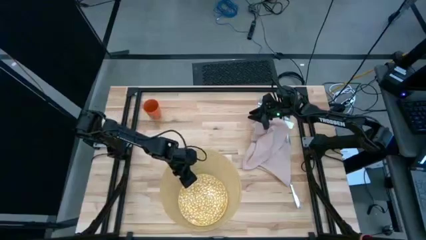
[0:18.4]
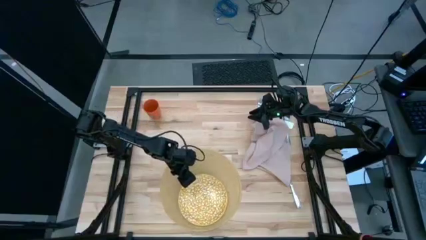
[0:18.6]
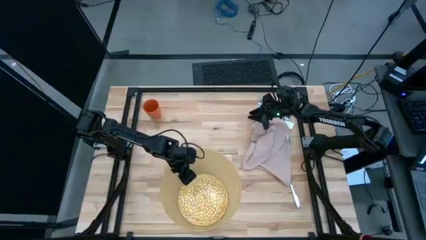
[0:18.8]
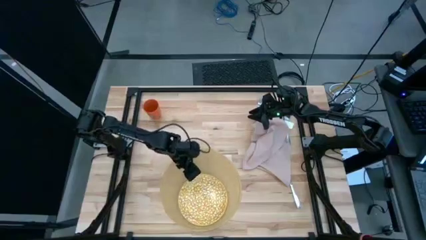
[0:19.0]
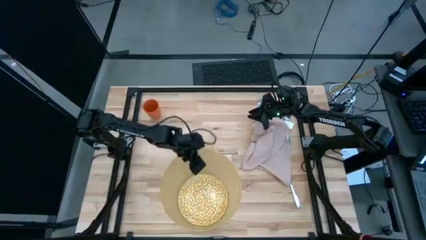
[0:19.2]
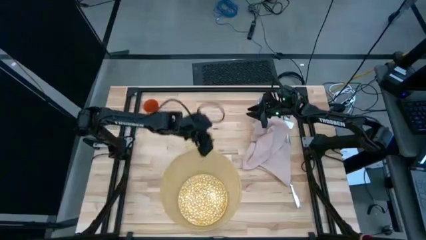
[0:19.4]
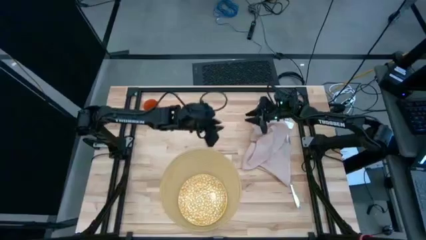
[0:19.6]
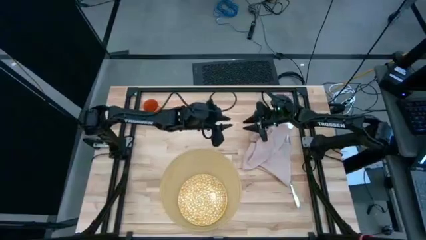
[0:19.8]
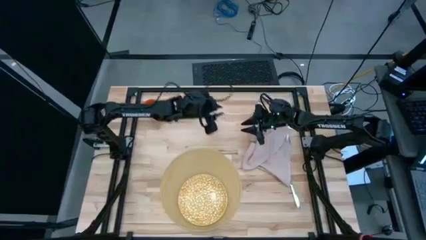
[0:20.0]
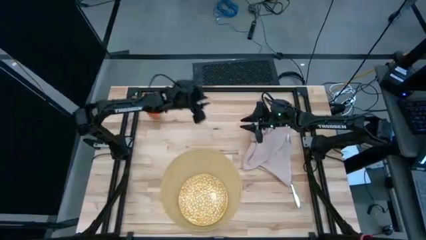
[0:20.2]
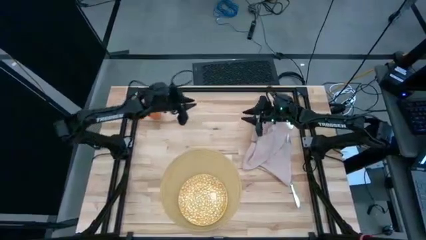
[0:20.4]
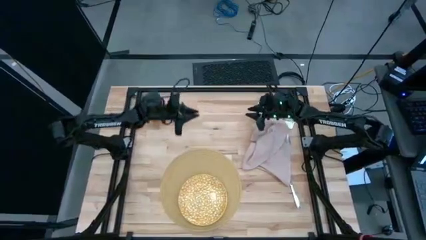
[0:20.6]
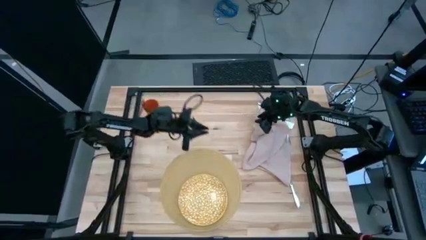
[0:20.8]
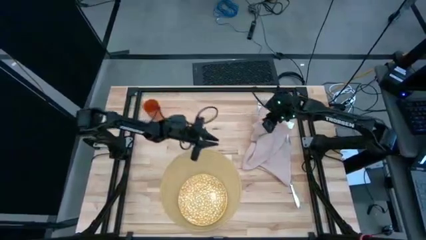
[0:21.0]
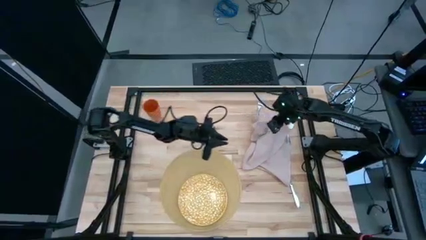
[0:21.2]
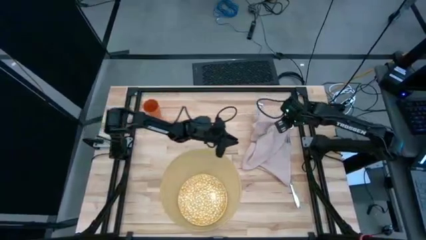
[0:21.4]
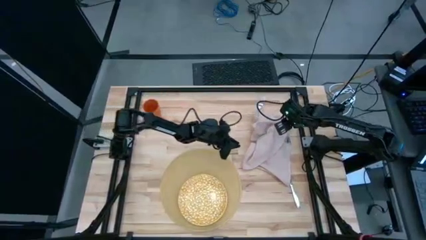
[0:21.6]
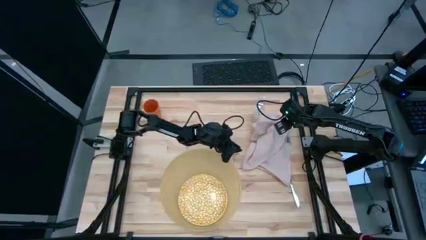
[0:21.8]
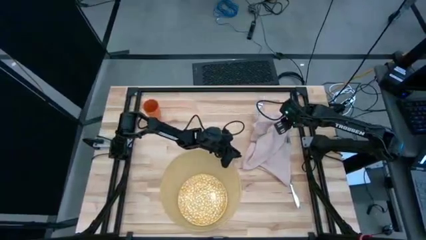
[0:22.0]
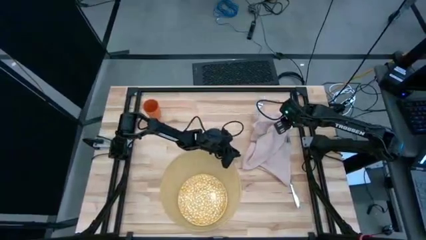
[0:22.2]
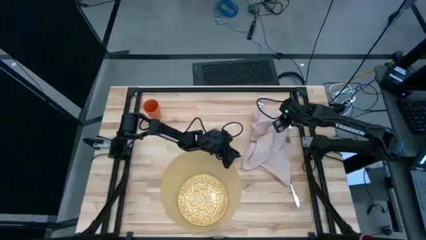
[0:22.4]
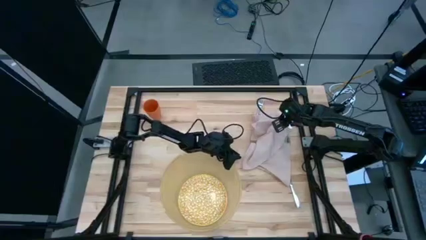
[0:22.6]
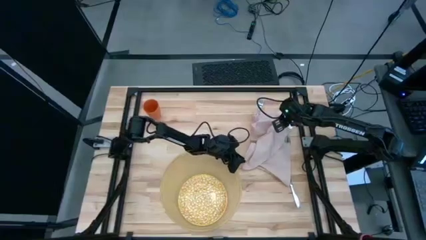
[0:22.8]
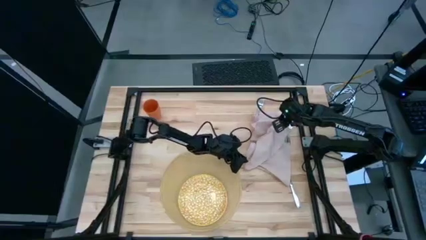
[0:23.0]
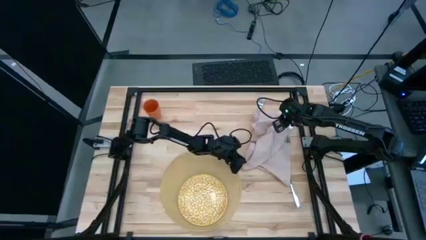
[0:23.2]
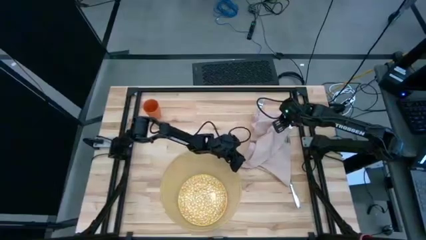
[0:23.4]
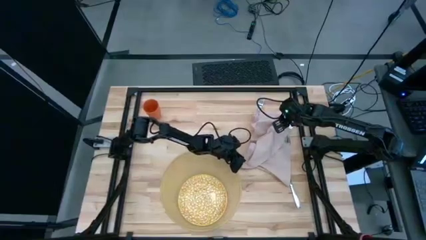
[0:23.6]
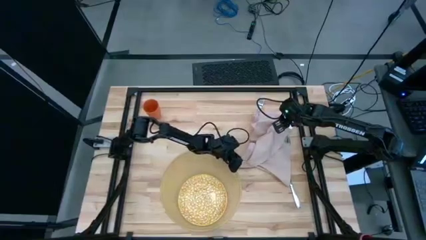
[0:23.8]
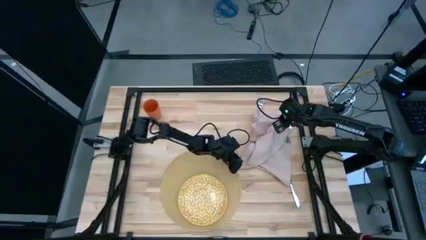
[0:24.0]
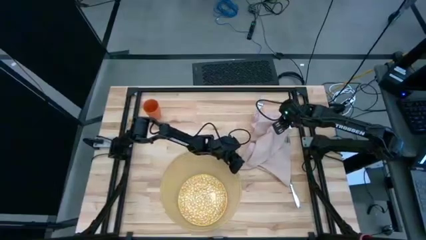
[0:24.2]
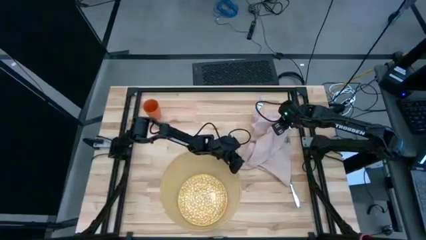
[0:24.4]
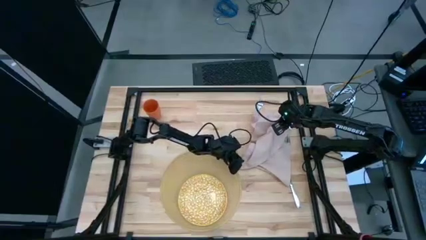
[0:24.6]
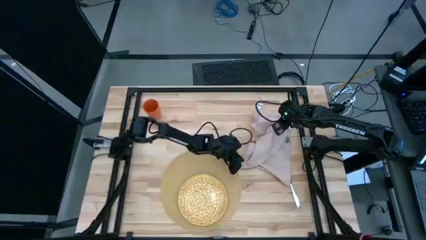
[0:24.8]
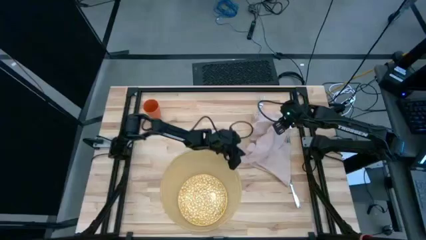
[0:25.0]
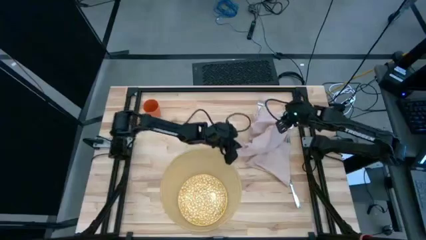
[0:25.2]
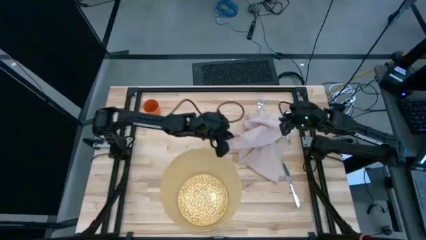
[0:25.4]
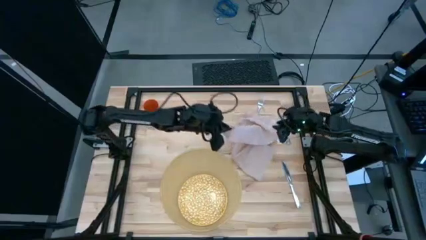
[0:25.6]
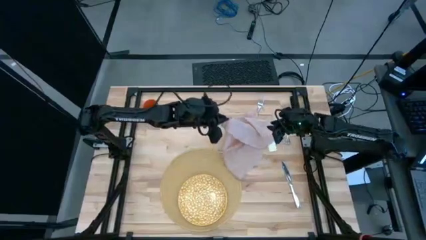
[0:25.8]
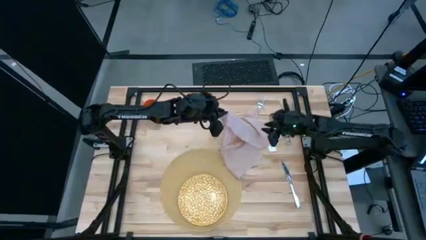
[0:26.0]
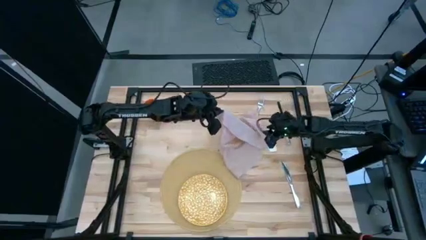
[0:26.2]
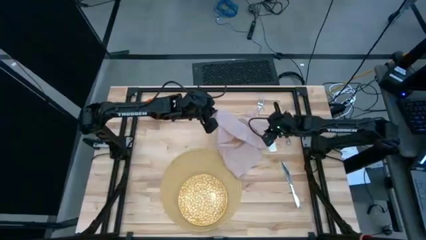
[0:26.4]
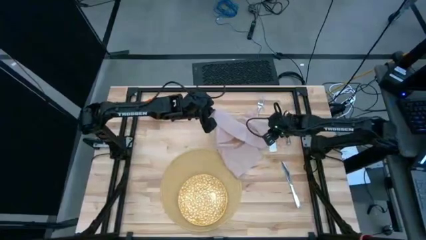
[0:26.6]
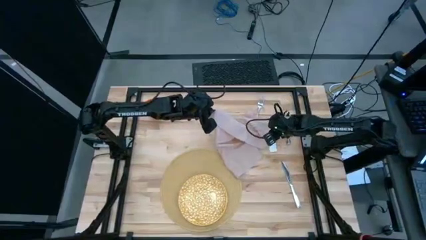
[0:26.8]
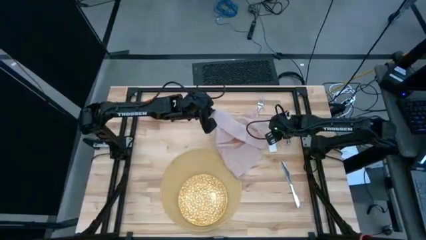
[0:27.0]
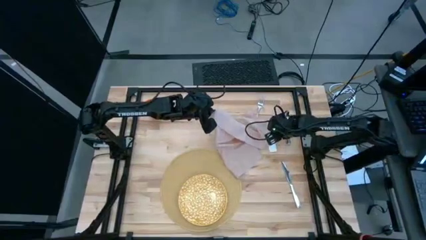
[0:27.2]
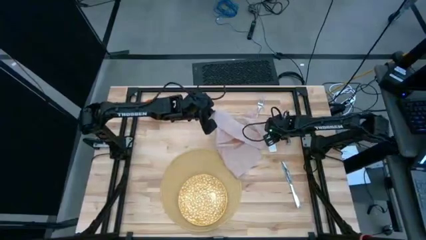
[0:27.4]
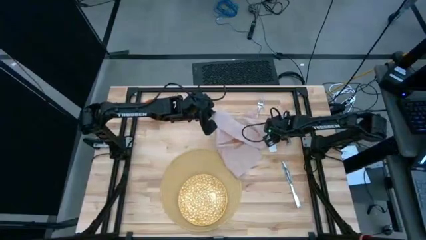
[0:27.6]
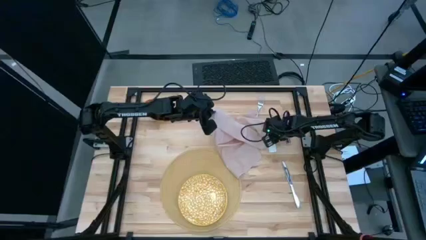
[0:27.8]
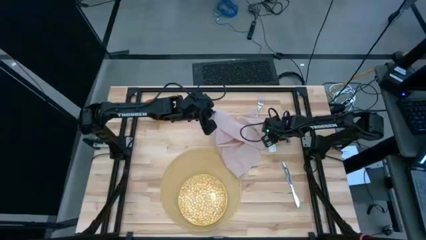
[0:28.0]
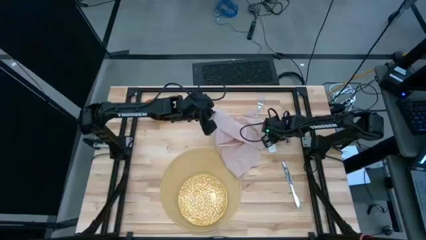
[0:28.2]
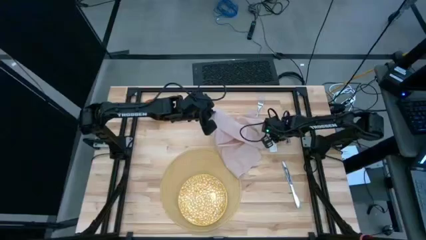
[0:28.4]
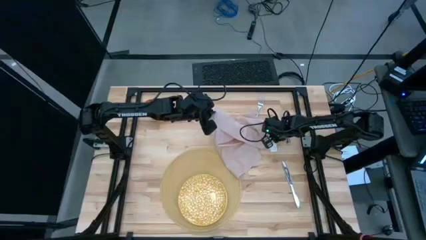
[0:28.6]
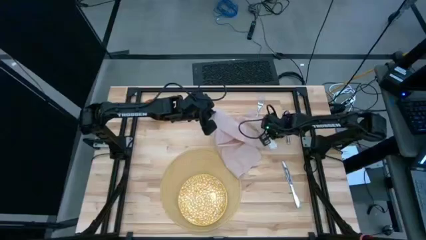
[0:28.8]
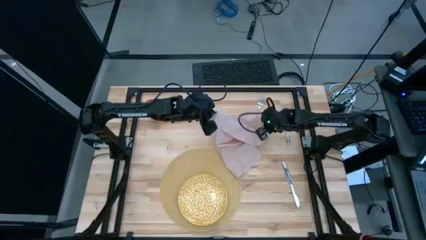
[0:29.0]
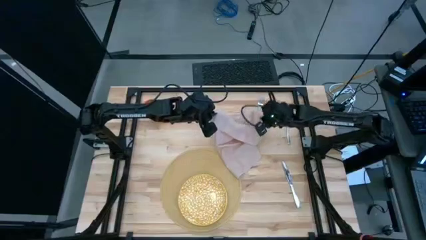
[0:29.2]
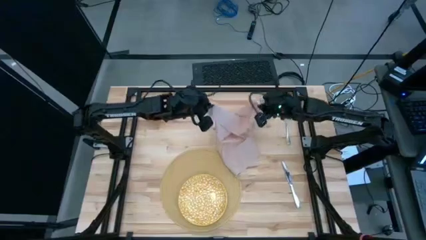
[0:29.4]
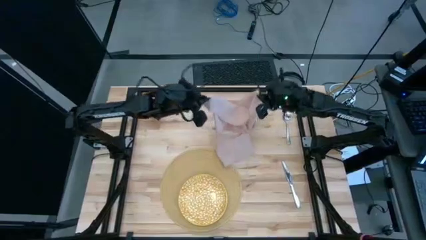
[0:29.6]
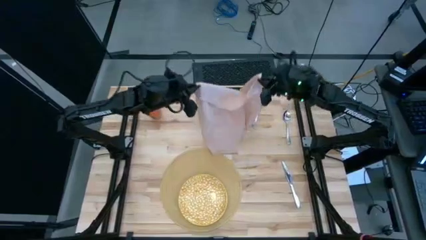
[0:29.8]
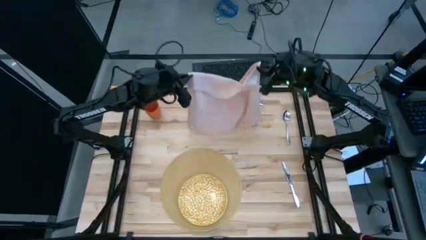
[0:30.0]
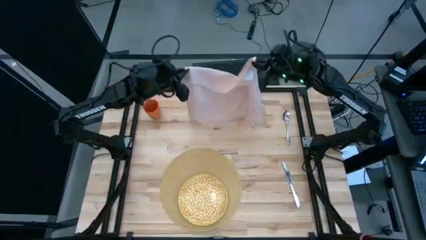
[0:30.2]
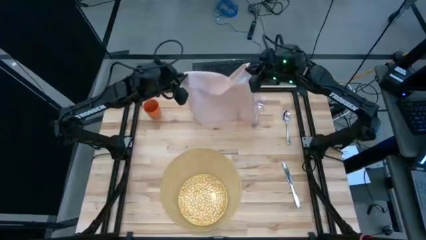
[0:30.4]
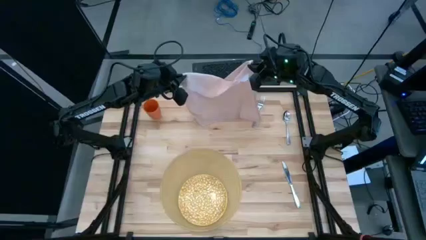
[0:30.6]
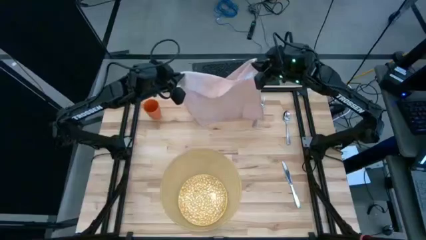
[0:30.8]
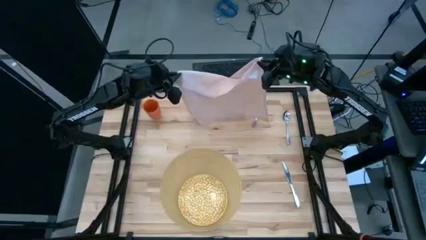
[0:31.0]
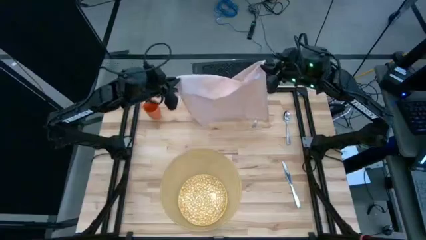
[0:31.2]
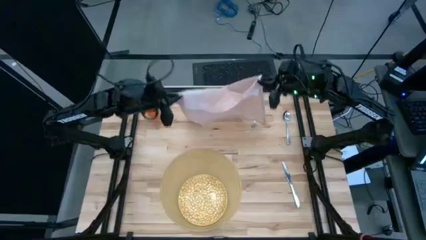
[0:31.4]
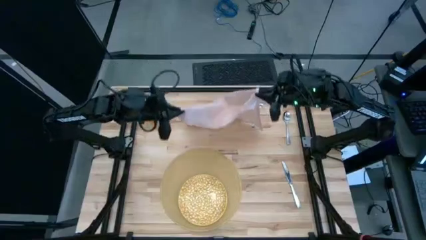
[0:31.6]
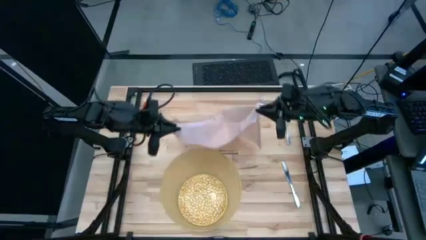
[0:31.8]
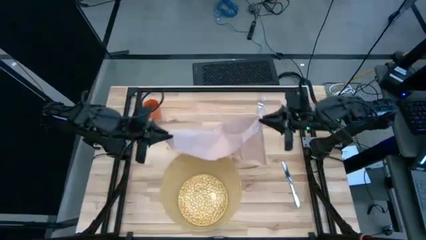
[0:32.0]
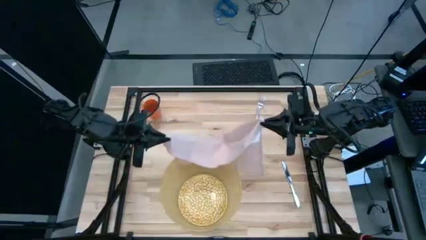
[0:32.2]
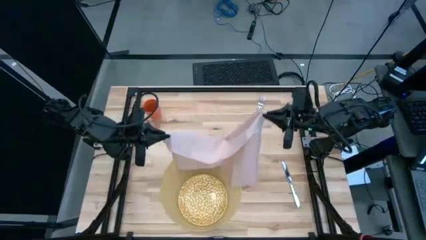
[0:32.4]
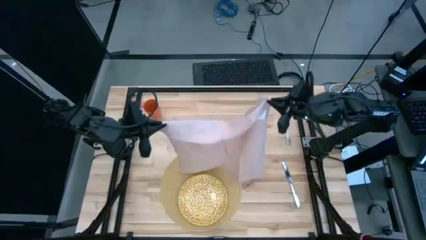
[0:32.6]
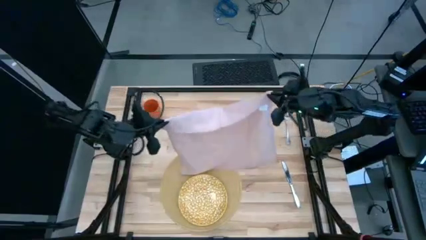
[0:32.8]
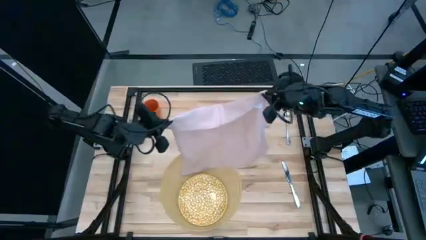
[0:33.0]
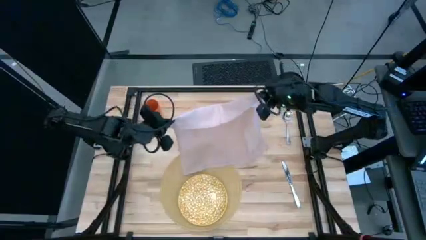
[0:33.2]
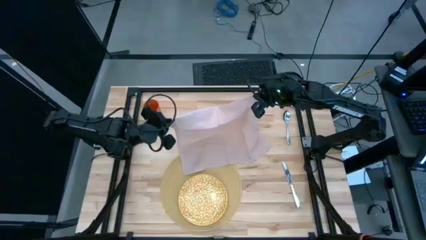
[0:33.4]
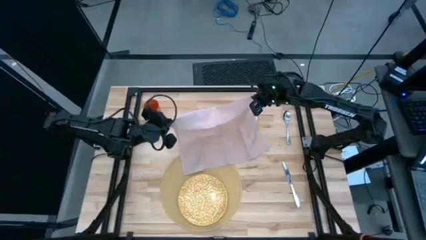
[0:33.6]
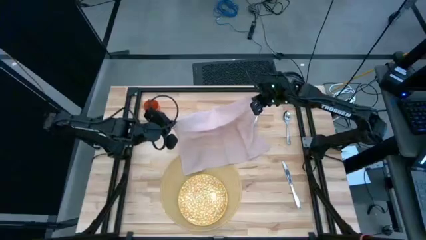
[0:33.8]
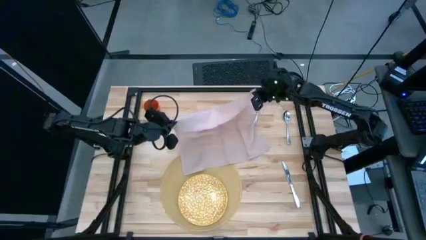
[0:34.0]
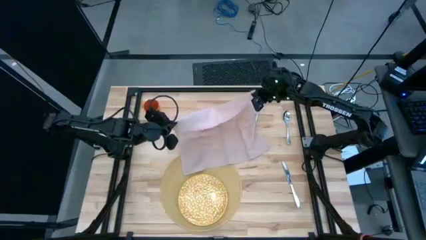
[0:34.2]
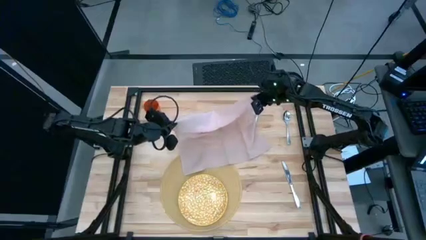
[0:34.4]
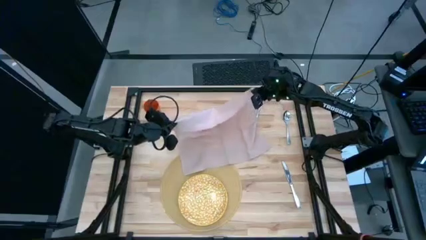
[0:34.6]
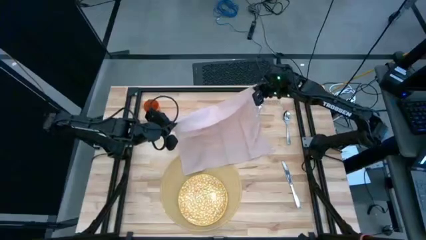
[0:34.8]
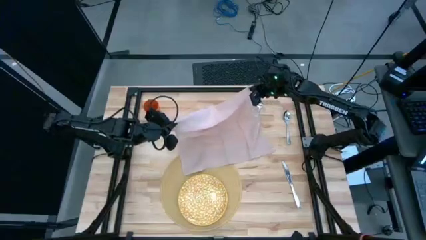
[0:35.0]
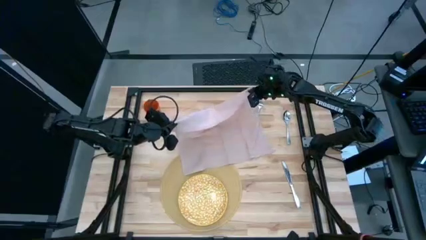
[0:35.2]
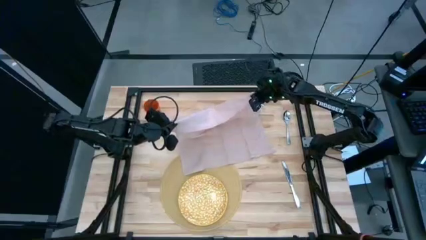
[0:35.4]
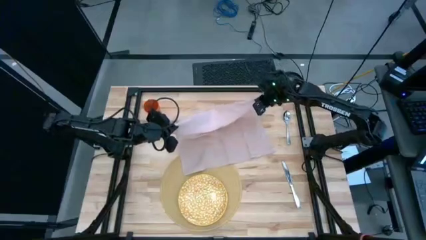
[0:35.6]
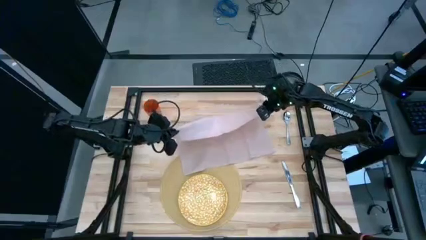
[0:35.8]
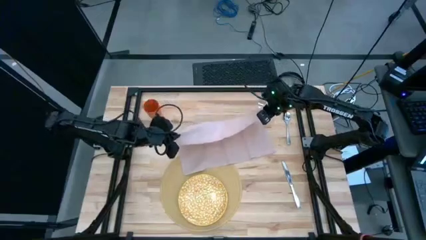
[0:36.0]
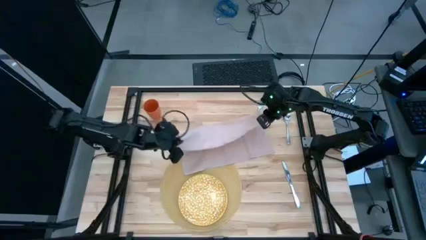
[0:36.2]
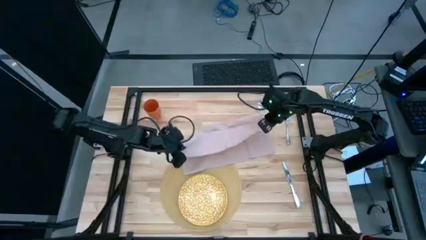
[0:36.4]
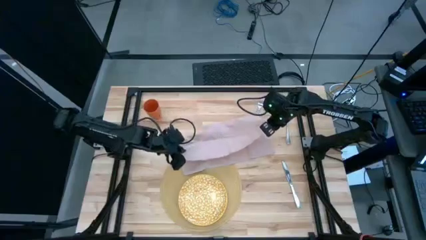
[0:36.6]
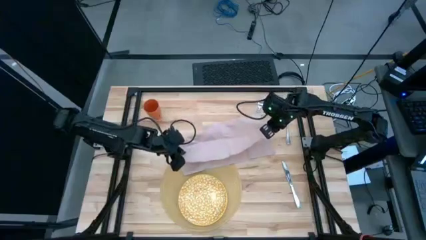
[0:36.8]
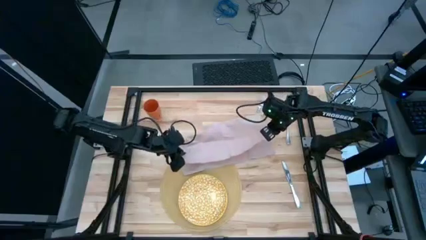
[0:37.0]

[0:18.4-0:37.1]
Task: Set table place
Fold the light orange napkin on the table
